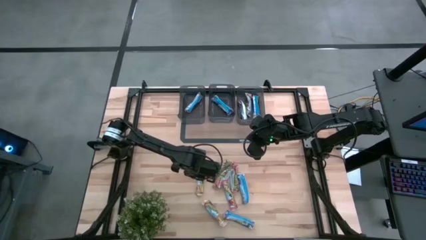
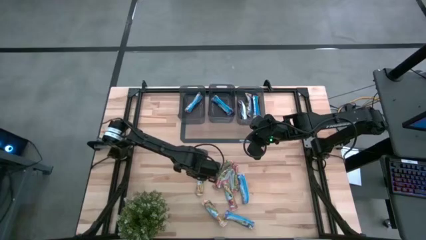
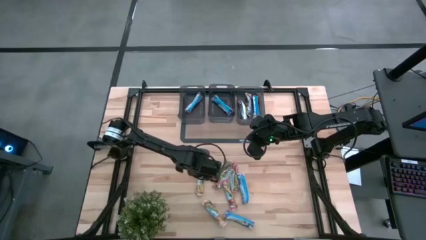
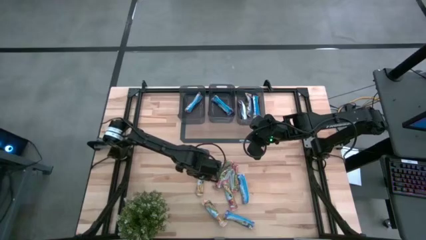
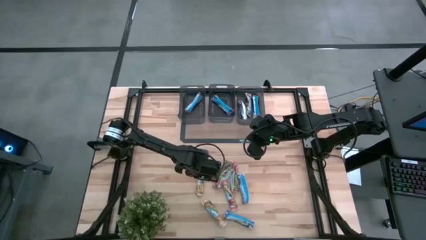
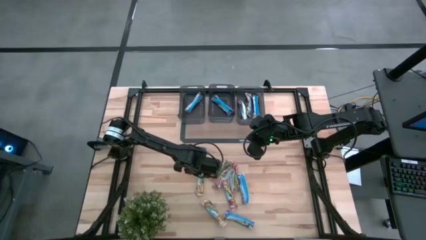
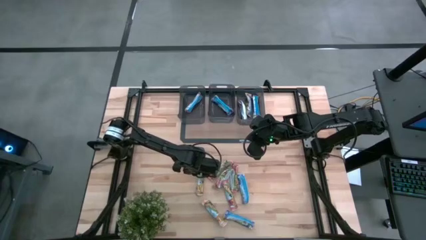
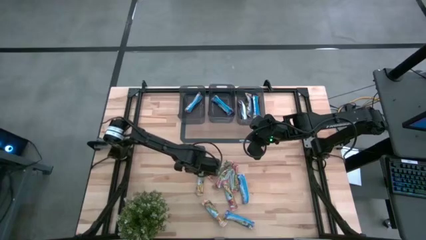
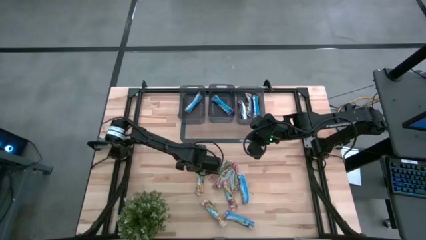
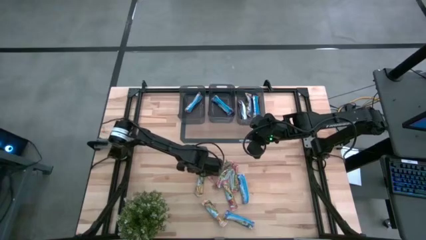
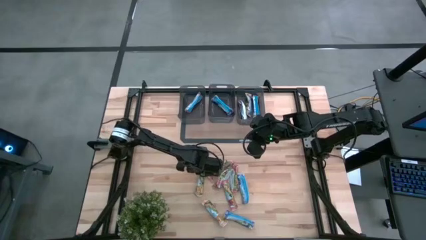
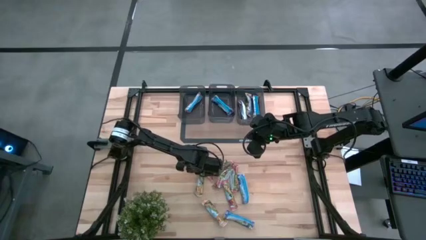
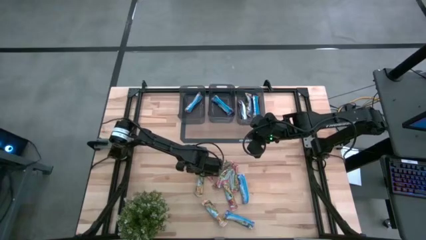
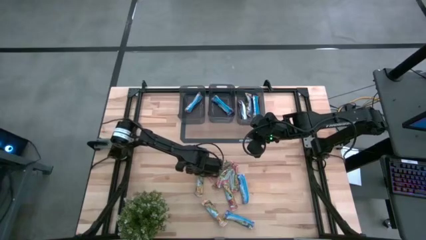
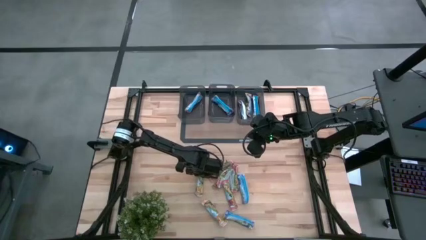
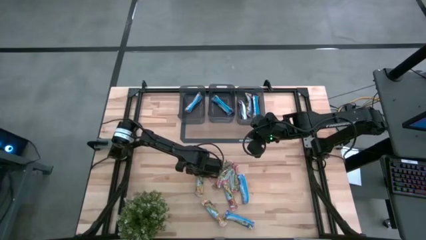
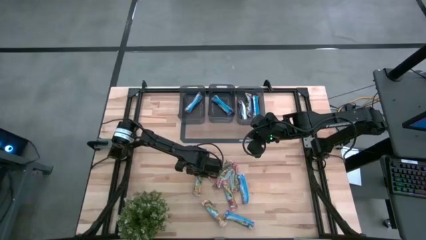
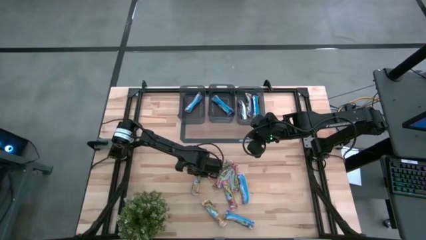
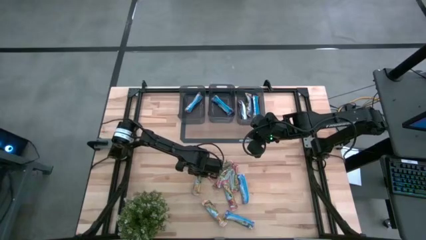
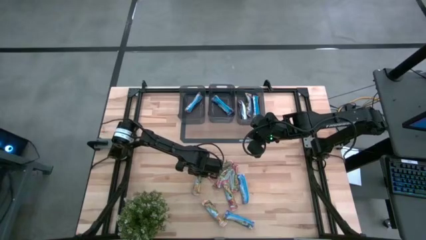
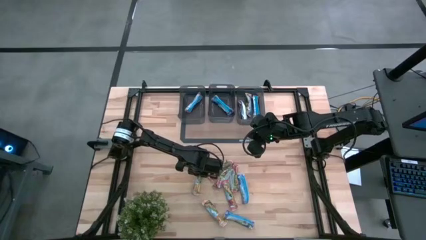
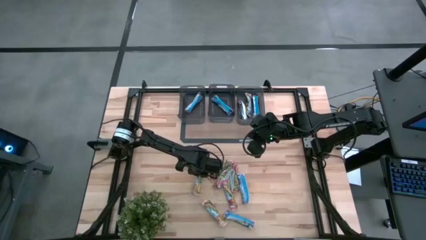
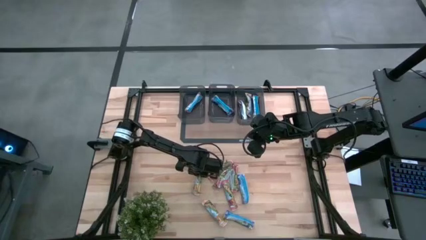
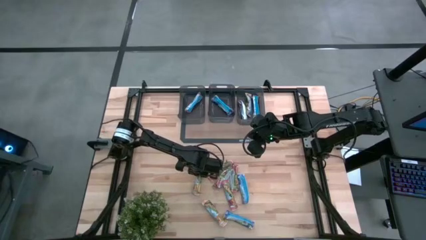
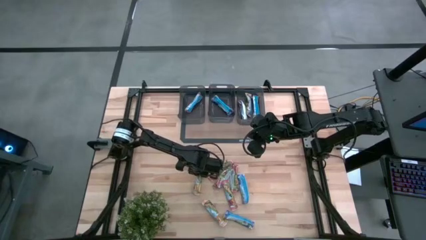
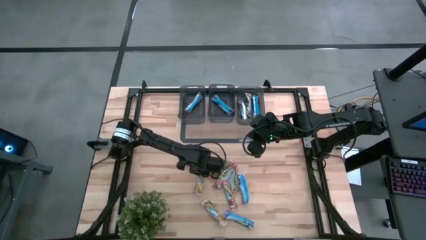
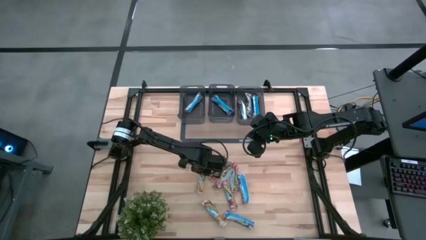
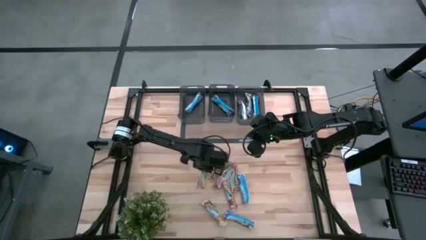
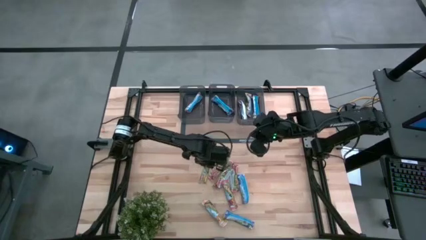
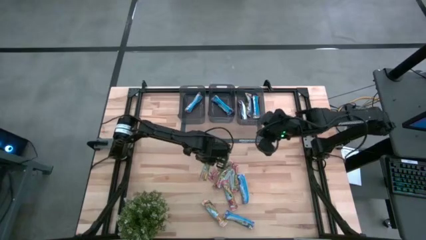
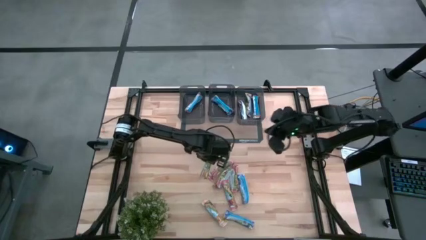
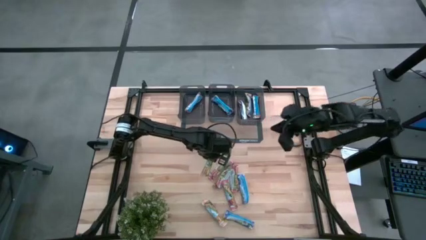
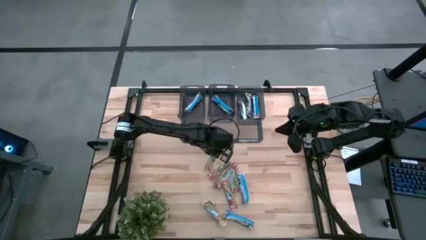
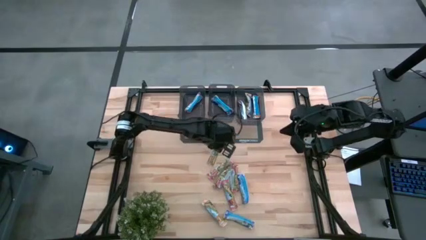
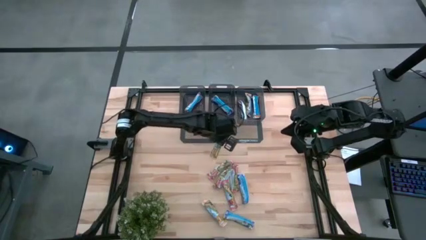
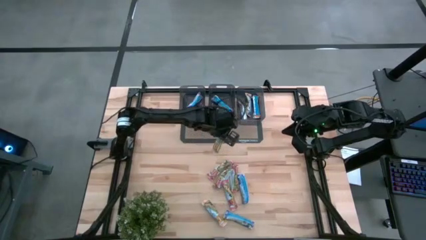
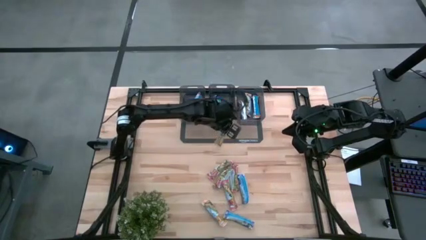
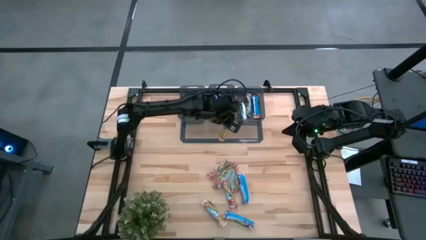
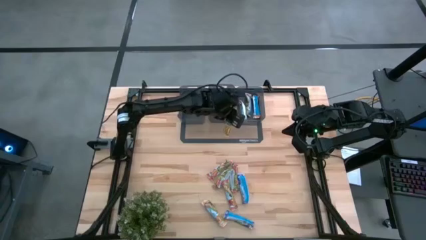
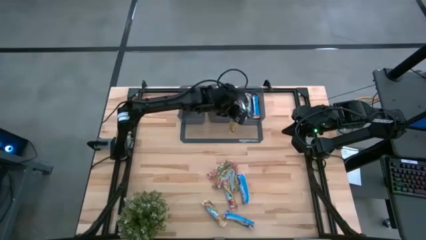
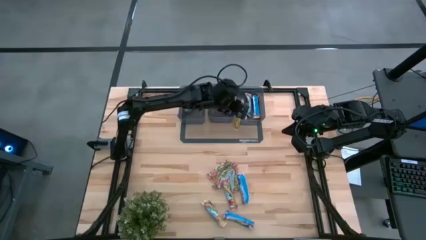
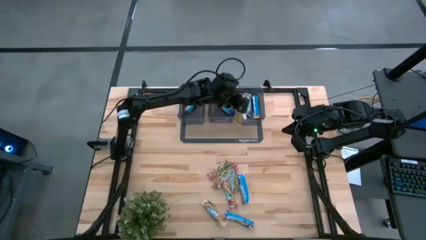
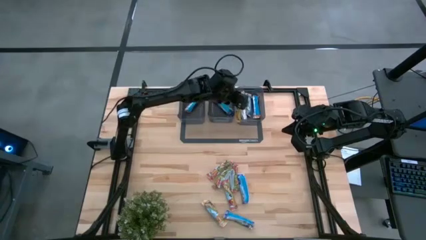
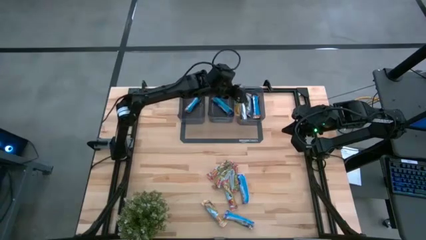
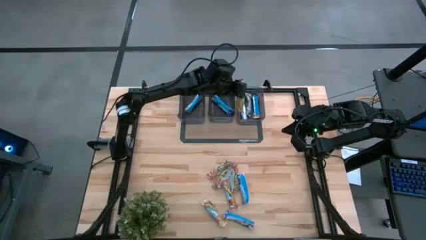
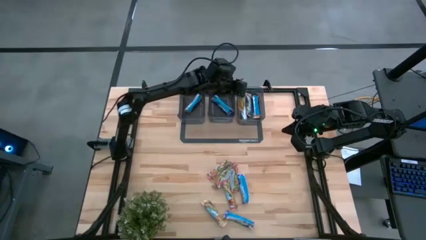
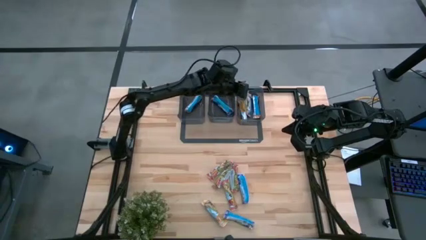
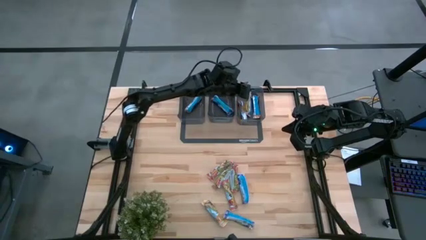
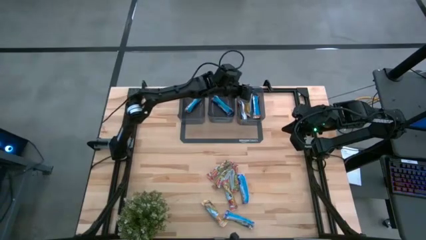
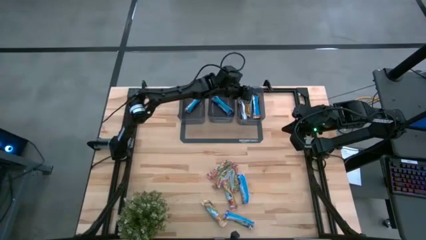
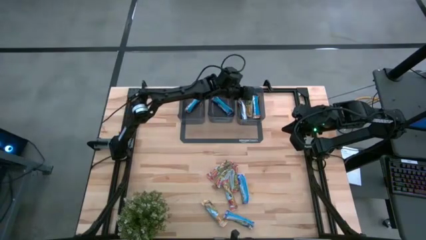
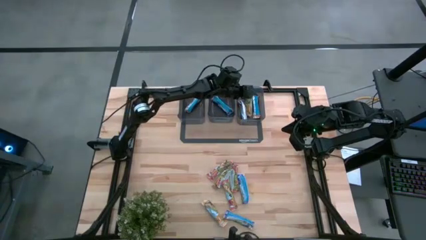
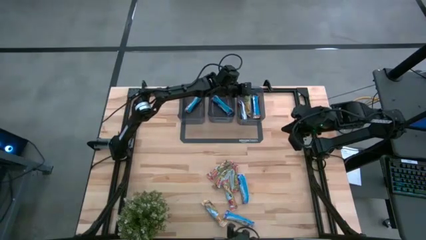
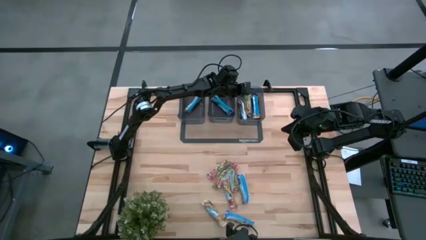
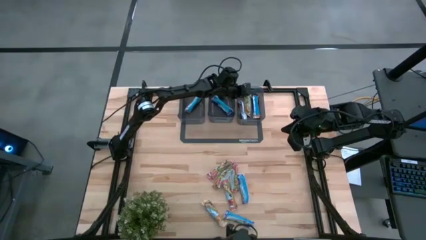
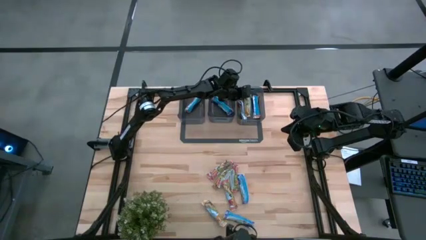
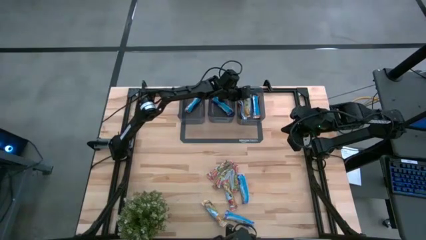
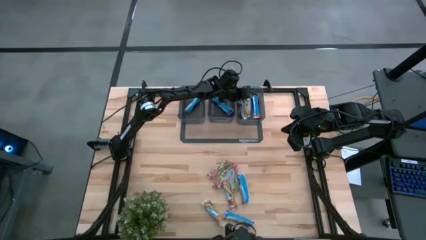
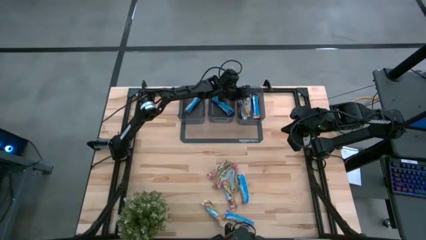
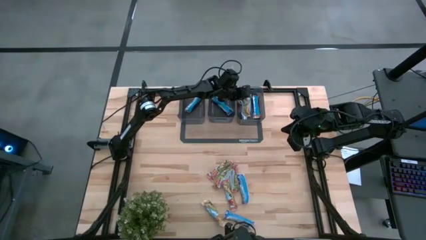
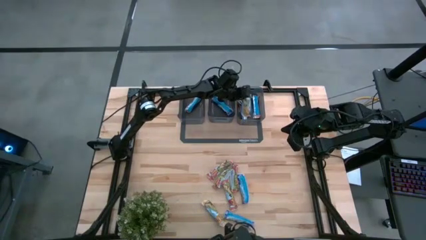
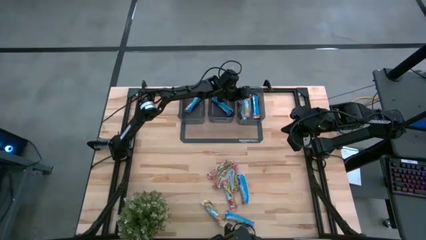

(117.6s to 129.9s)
Task: Pick and place Granola Bars by type
Put the yellow granola bar into the right black bin

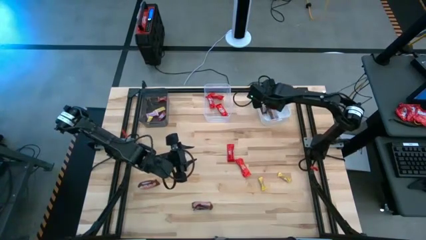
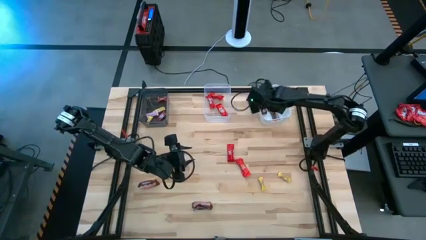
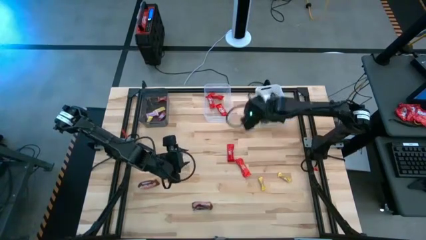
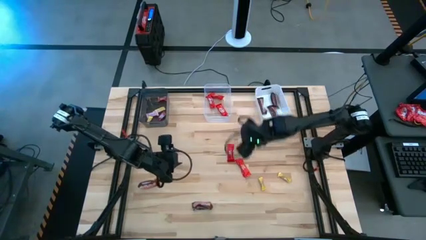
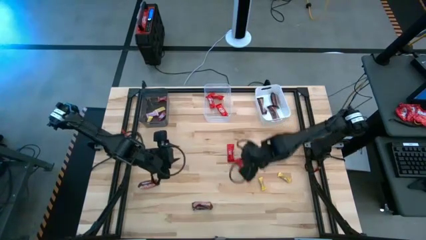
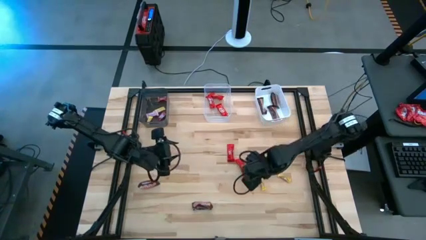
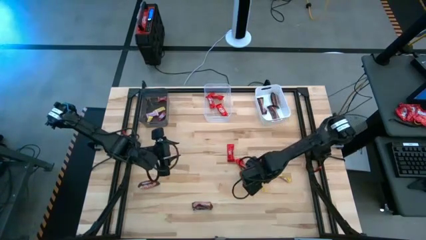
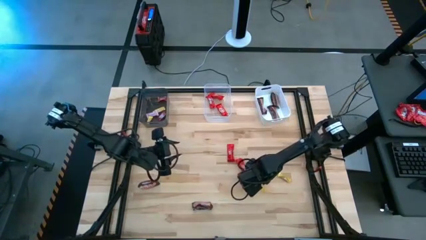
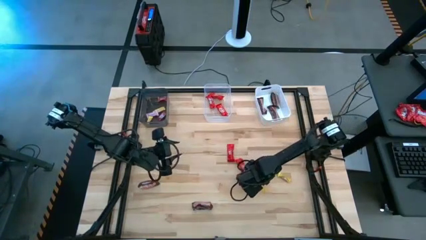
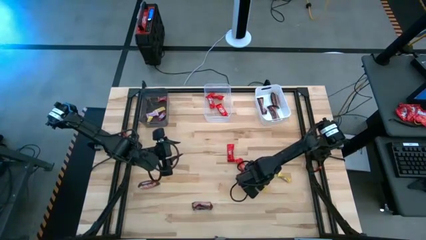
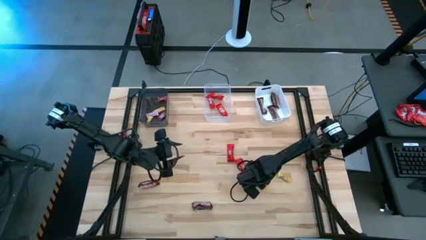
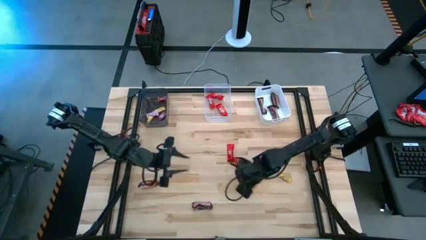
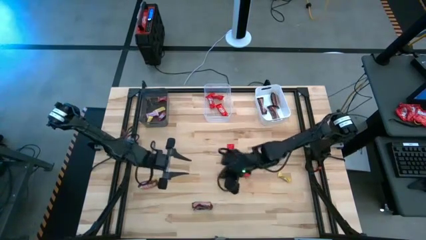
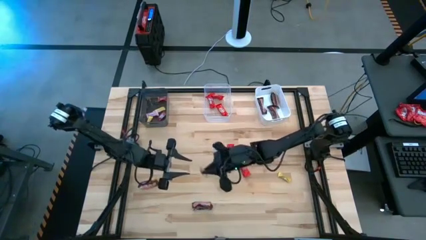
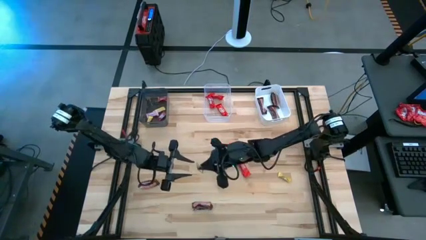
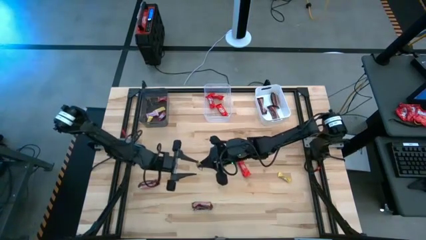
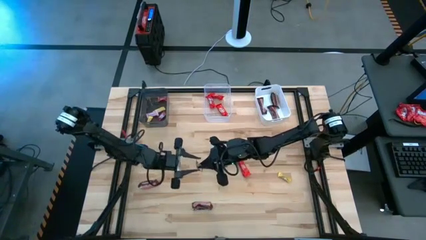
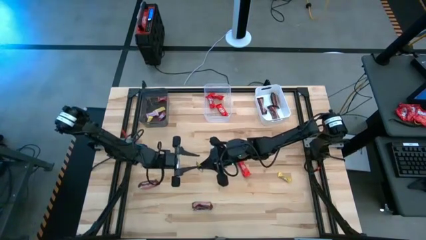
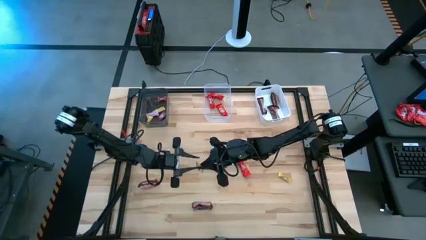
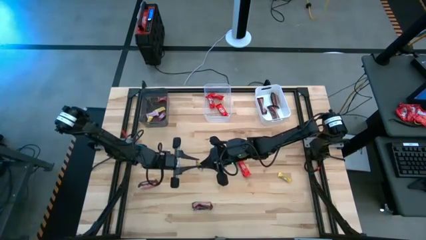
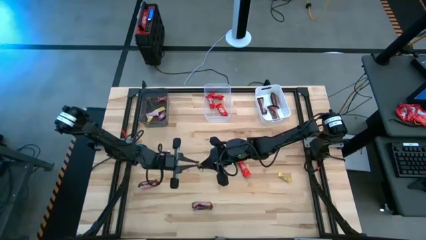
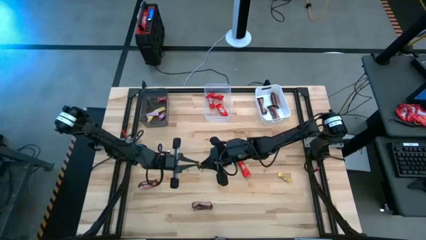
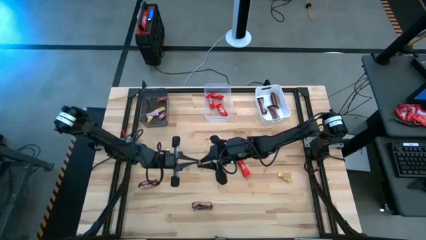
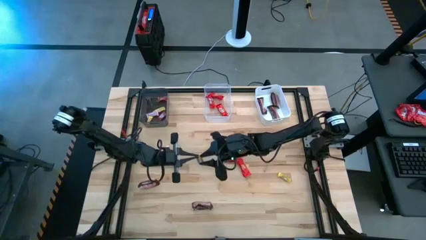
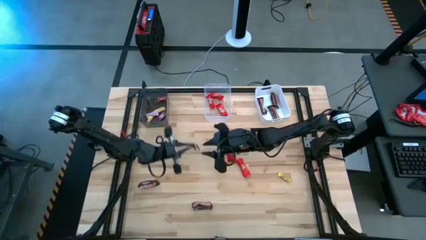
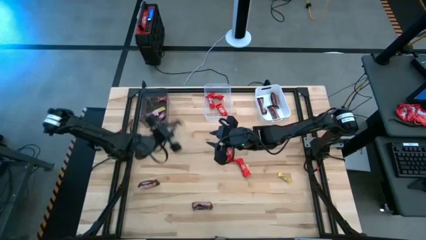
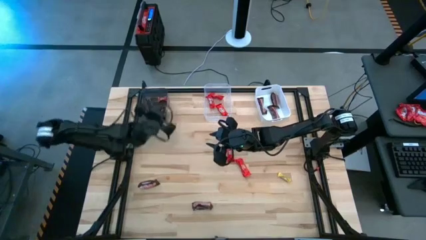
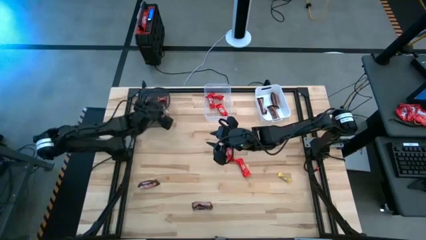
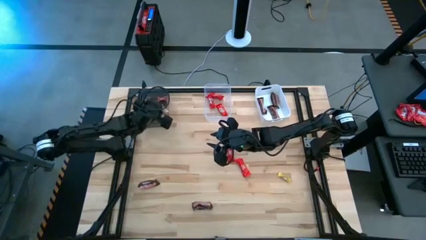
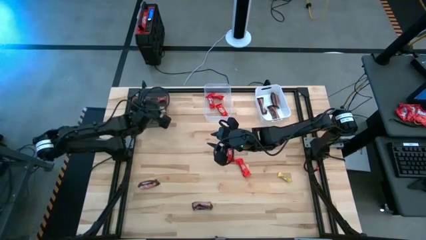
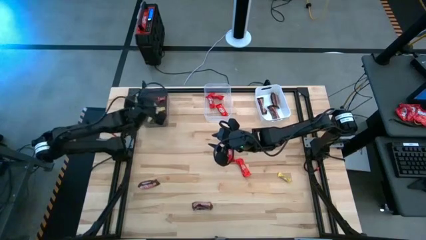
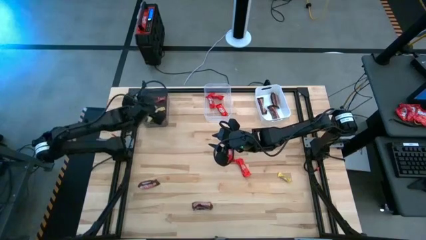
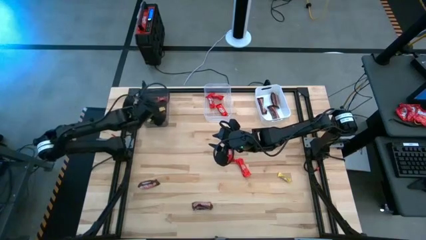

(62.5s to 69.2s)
Task: Sort candy by brand, put in halloween buckets
Put the yellow candy into the black bin
